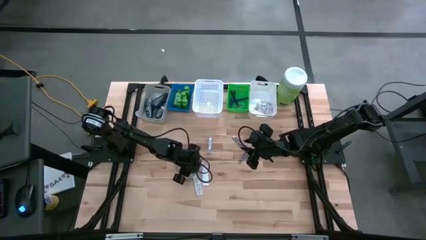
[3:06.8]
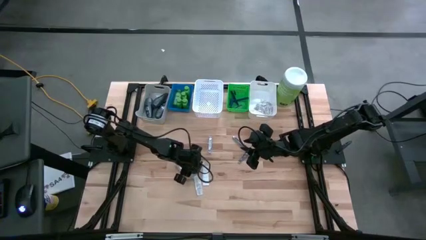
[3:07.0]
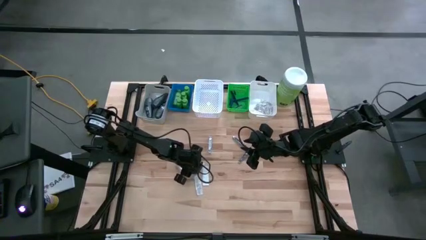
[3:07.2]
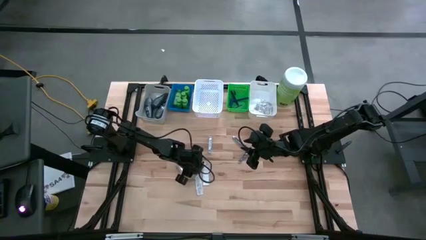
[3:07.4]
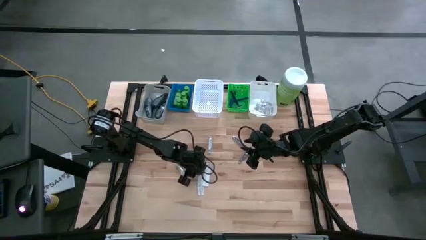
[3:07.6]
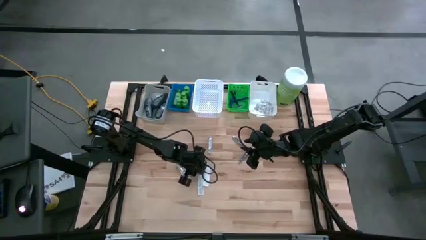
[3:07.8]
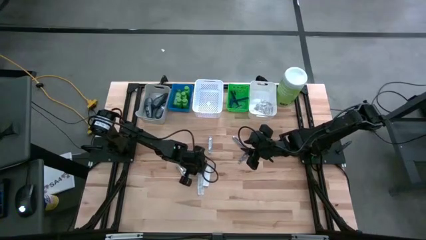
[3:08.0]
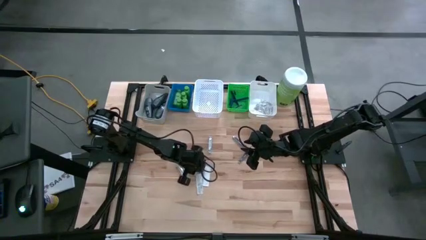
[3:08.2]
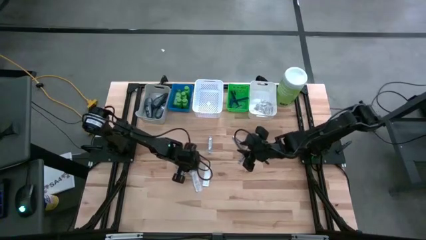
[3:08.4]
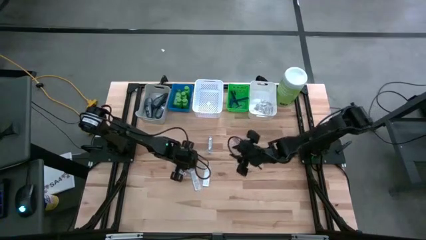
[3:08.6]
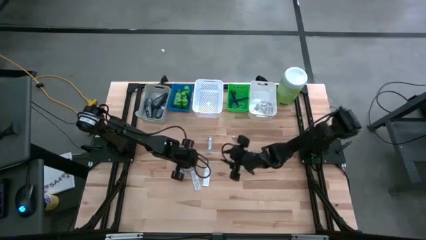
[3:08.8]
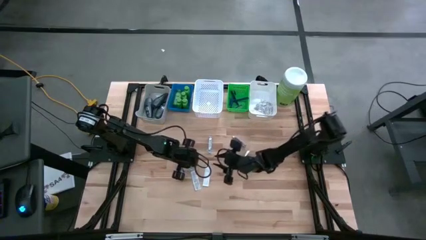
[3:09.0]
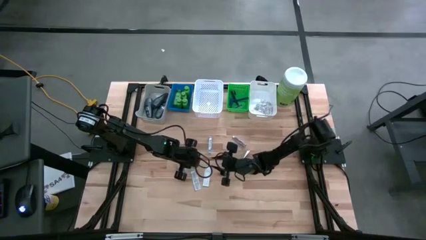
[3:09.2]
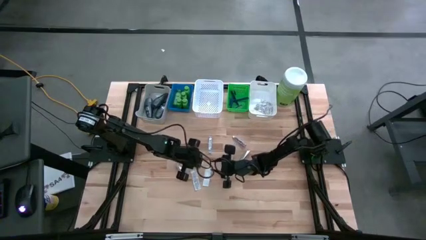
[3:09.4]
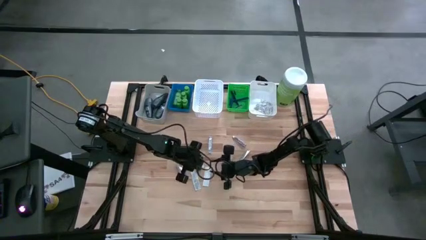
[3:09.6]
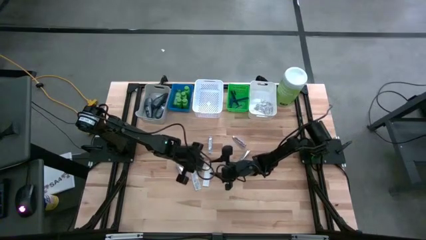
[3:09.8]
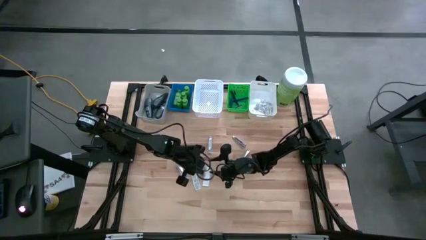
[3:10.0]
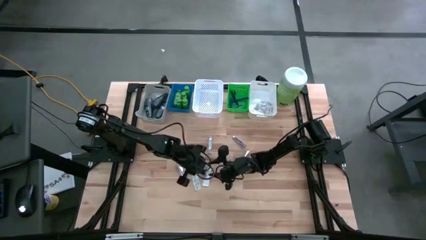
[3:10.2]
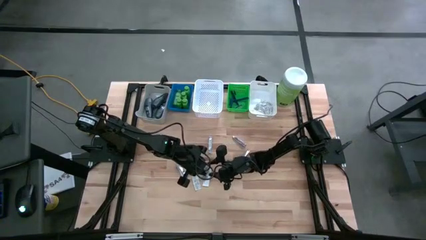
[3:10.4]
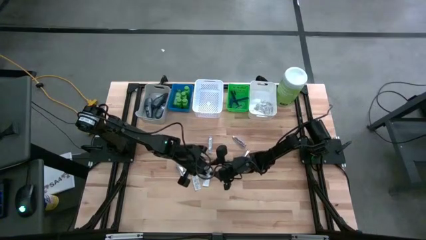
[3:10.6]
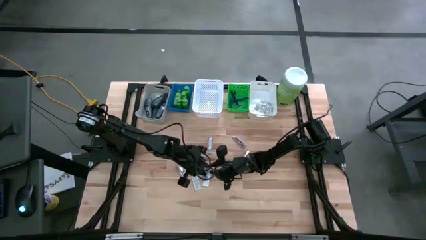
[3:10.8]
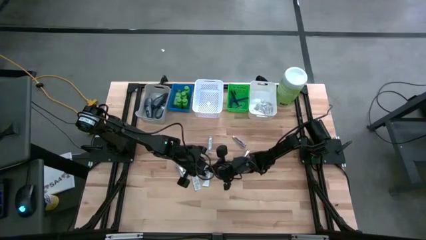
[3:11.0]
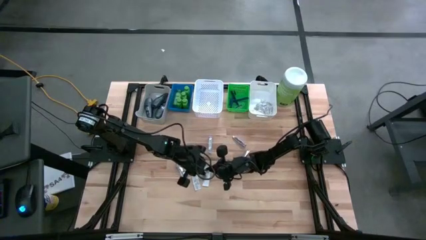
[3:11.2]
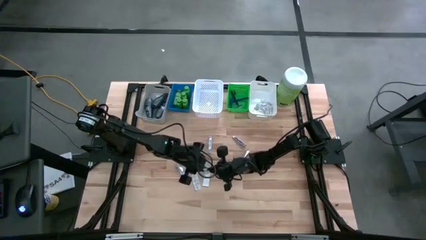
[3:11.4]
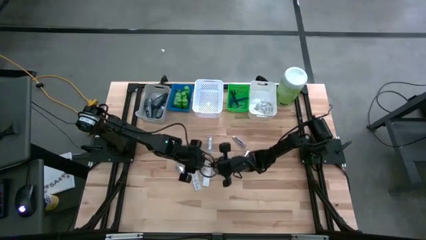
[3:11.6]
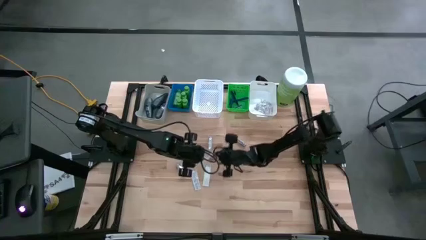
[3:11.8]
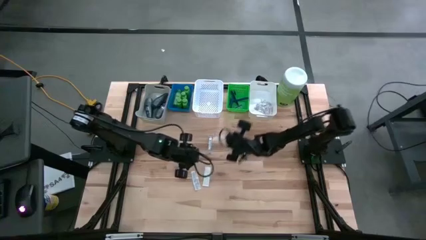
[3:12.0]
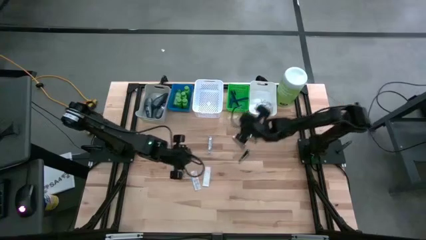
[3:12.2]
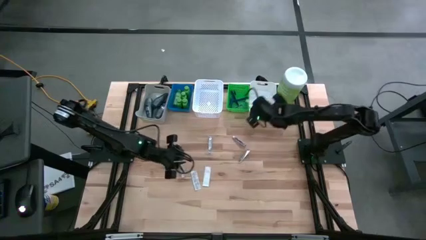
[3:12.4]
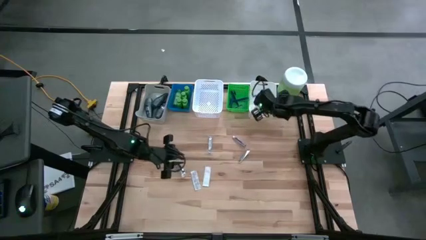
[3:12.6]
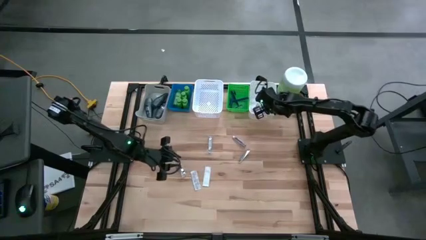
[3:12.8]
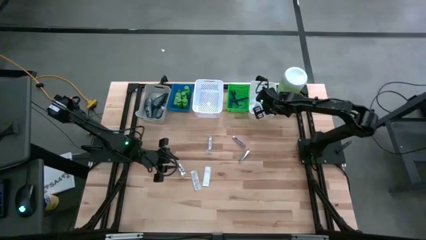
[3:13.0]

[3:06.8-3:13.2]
Task: Pick & Place Travel size toiletries
Put the bandage into the right white bin

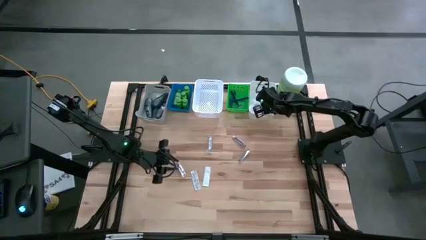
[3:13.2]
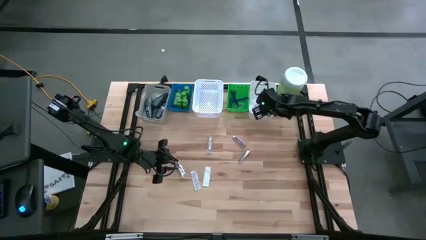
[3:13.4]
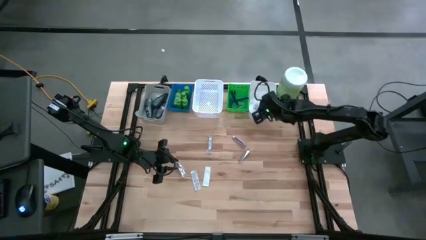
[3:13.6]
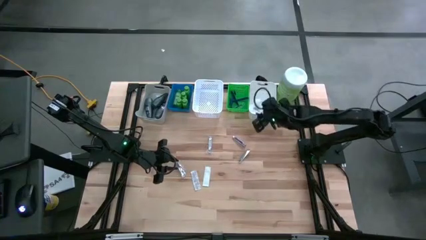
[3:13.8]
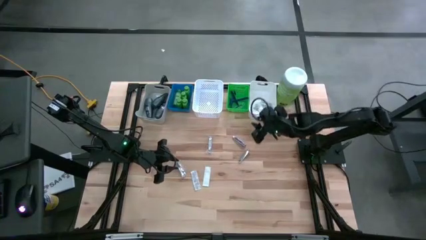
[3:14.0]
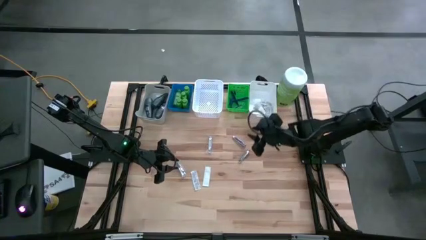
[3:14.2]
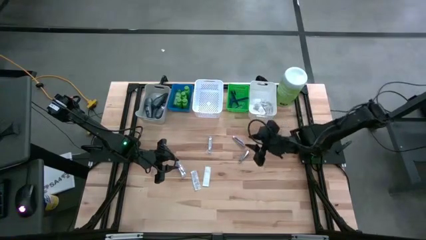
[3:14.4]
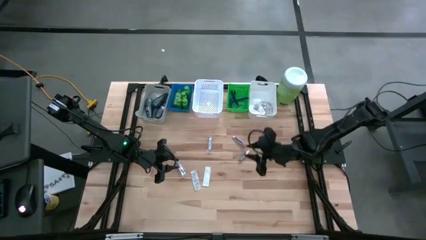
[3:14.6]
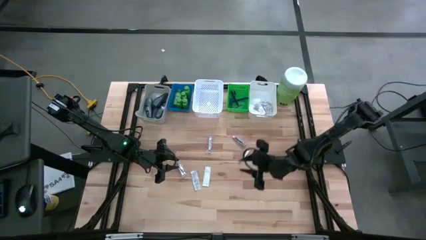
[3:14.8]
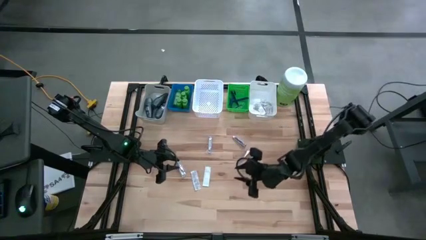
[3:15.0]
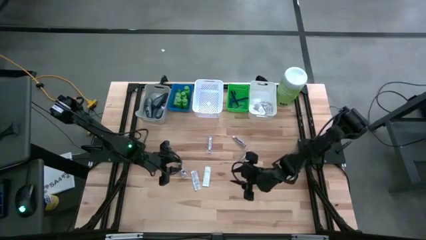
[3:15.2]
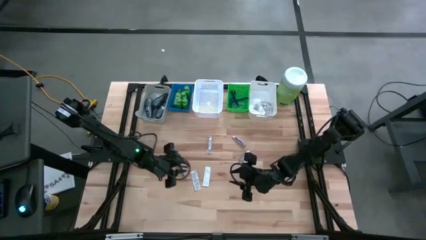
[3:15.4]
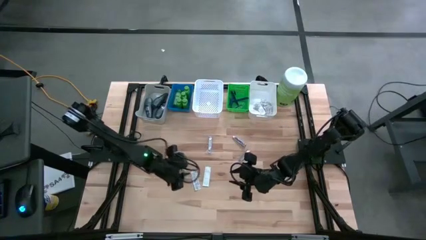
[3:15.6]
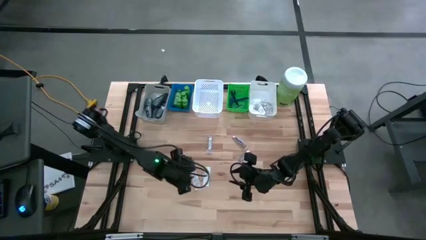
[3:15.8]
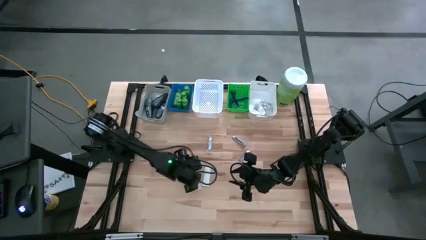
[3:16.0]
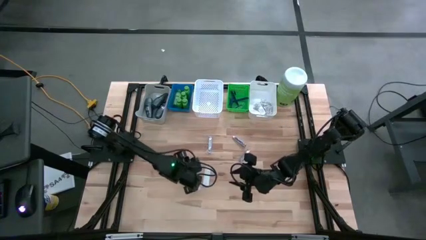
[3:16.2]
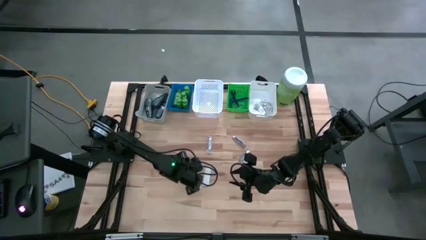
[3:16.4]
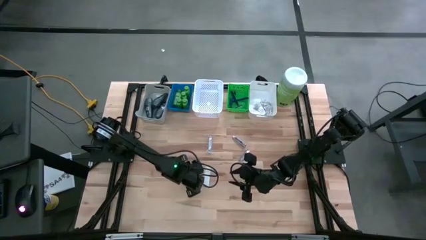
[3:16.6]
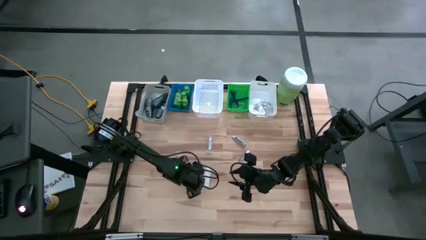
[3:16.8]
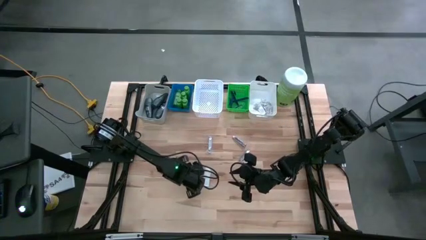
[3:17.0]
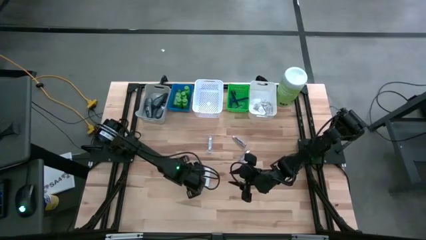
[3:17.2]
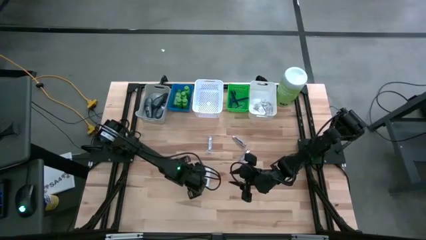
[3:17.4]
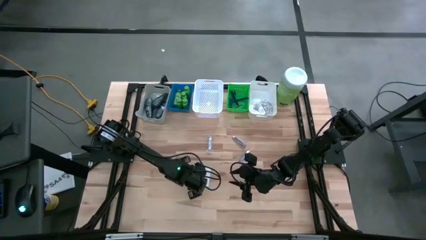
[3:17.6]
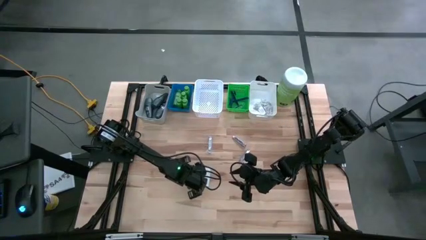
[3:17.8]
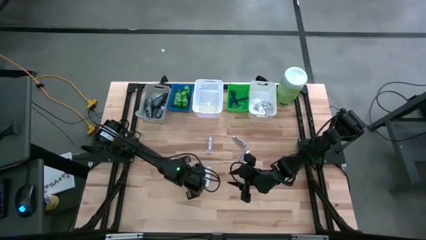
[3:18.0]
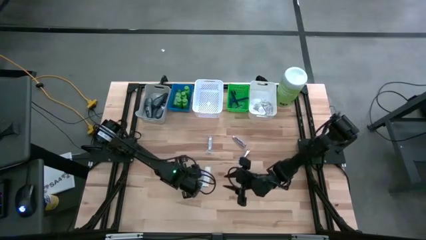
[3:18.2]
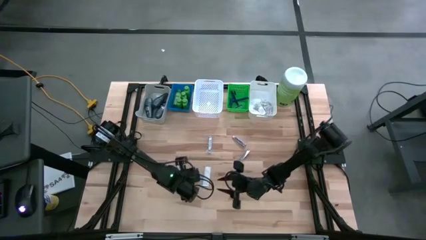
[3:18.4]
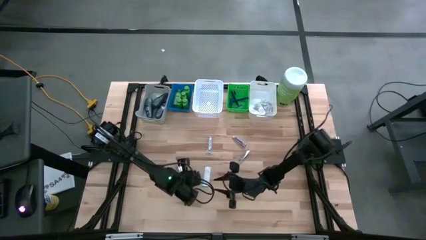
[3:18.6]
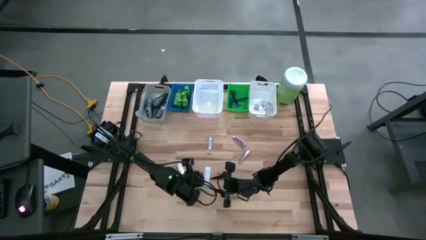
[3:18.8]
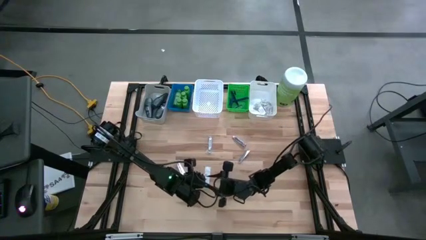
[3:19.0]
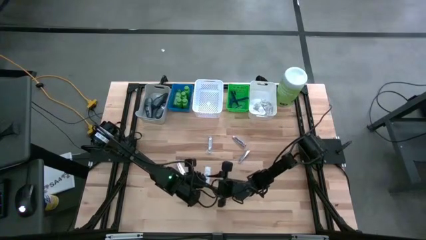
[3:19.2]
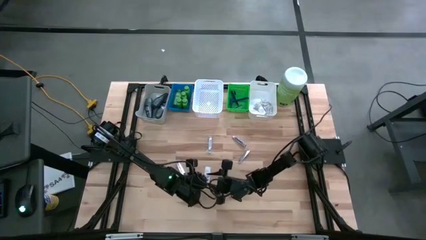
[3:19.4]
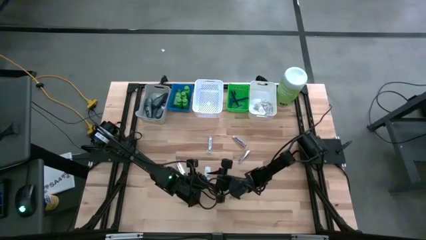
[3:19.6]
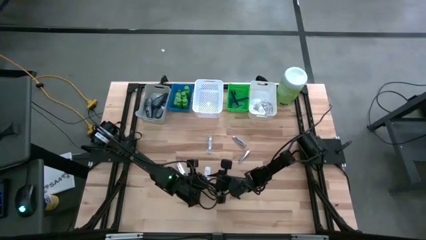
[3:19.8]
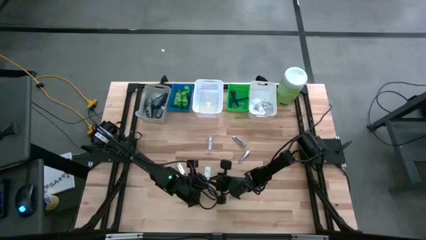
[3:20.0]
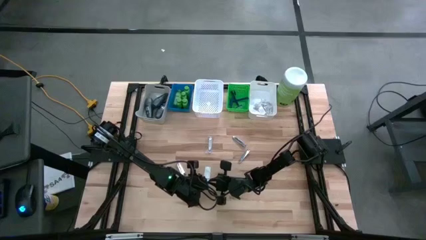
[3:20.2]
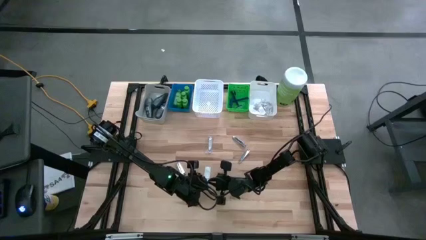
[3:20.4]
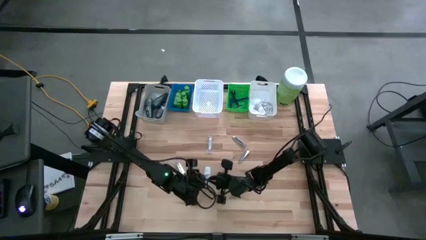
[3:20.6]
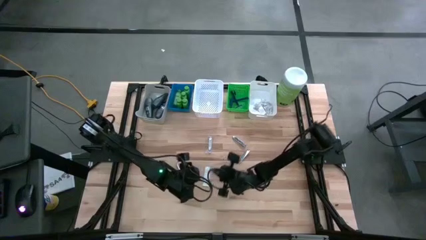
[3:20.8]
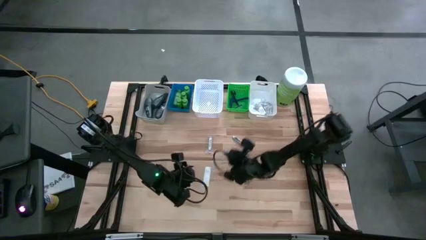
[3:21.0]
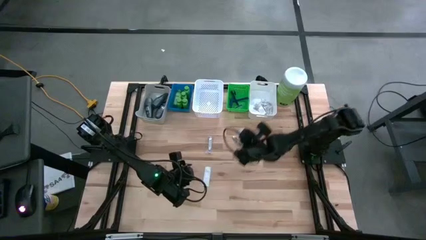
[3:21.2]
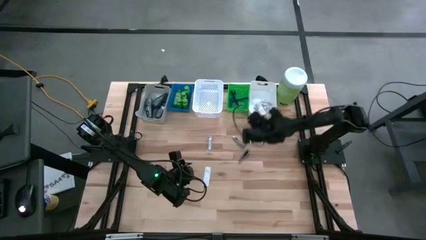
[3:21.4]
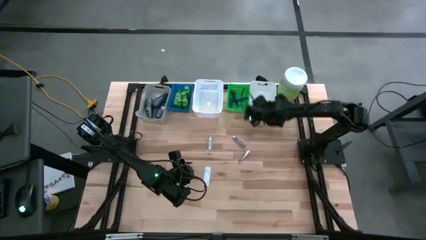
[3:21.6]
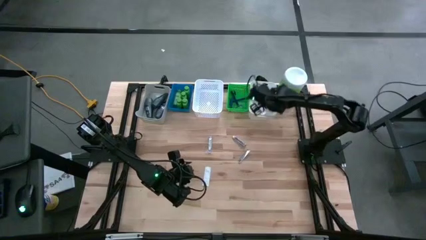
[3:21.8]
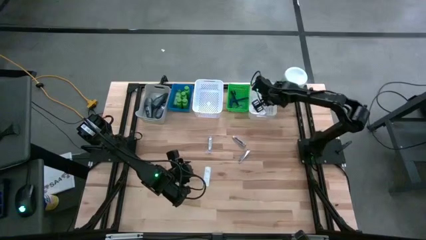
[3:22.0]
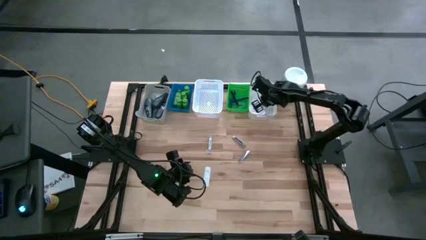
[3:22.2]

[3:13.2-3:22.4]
Put the bandage into the right white bin
